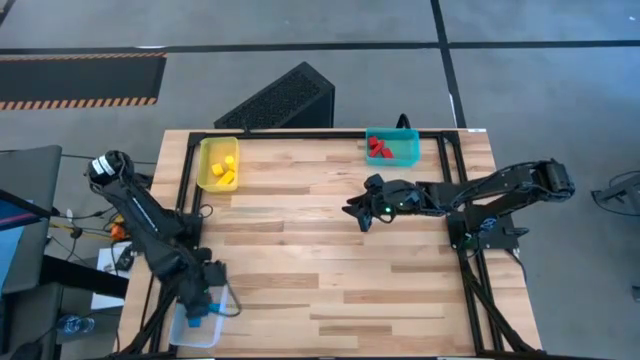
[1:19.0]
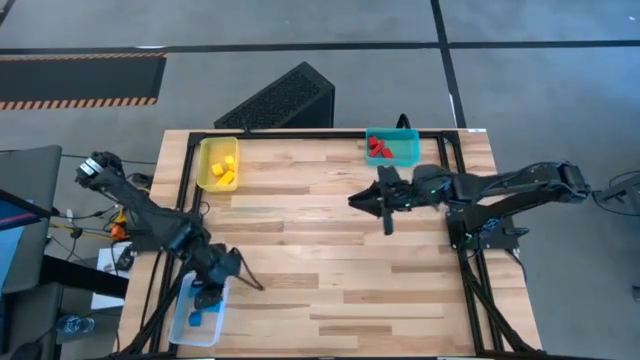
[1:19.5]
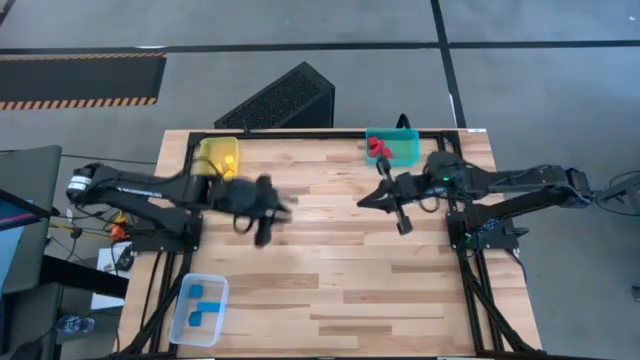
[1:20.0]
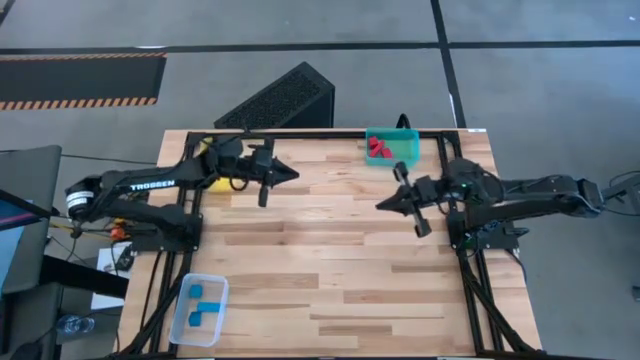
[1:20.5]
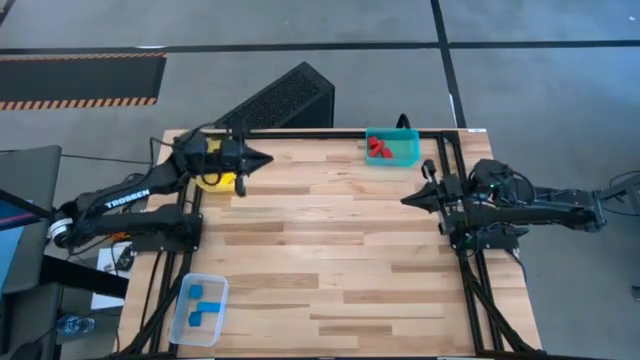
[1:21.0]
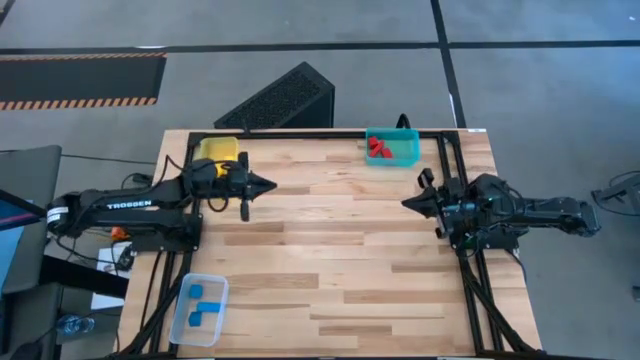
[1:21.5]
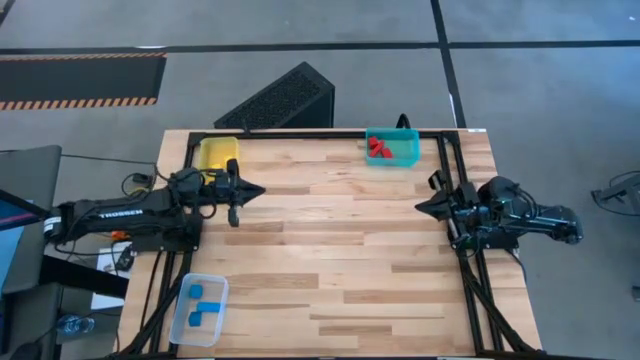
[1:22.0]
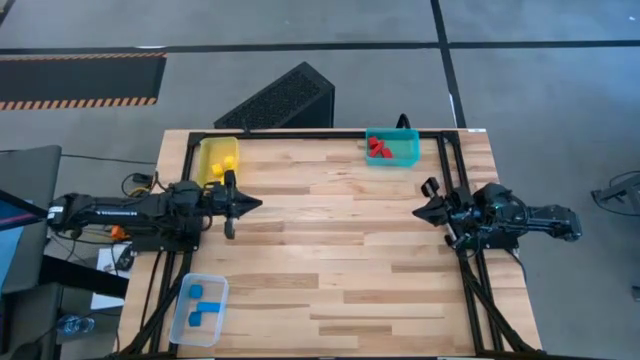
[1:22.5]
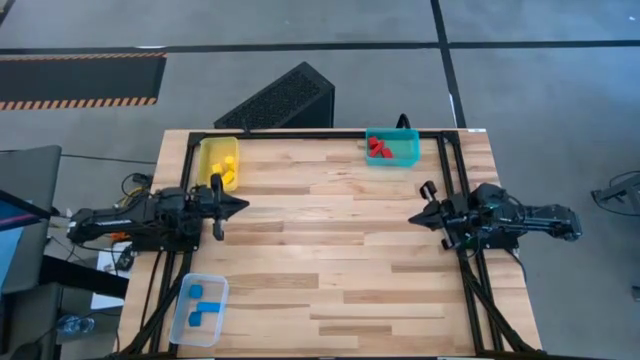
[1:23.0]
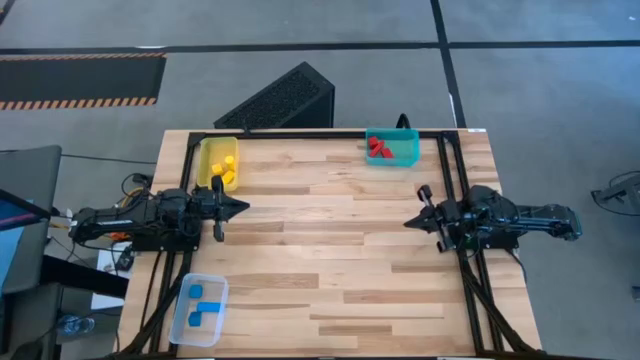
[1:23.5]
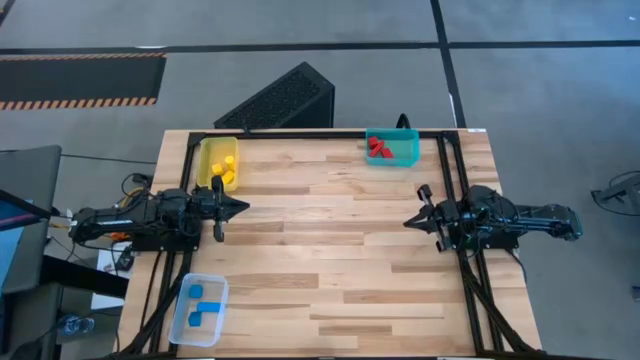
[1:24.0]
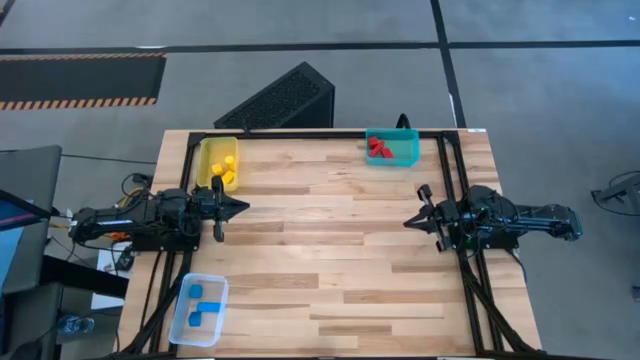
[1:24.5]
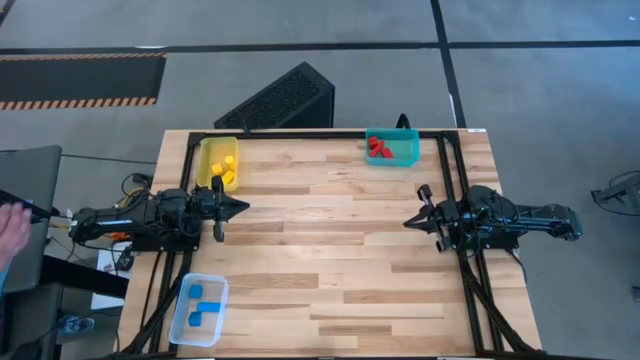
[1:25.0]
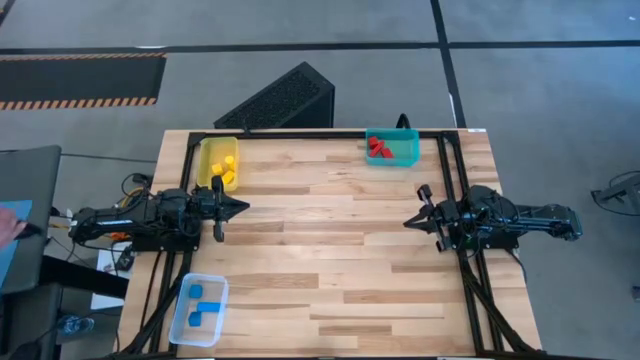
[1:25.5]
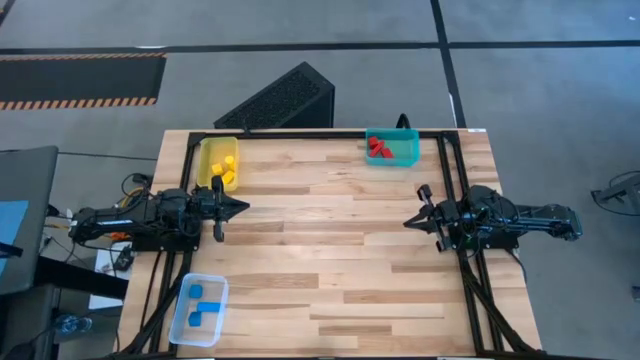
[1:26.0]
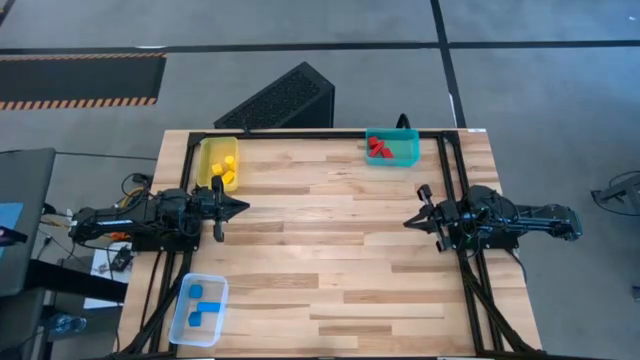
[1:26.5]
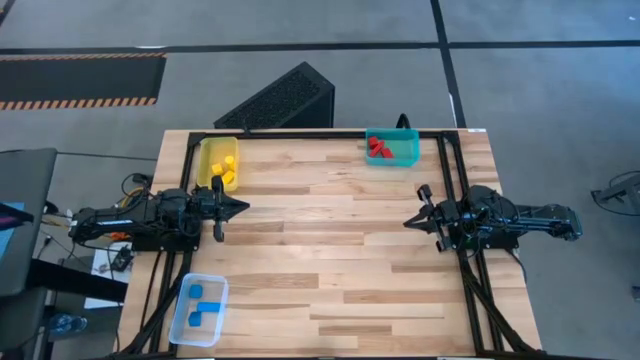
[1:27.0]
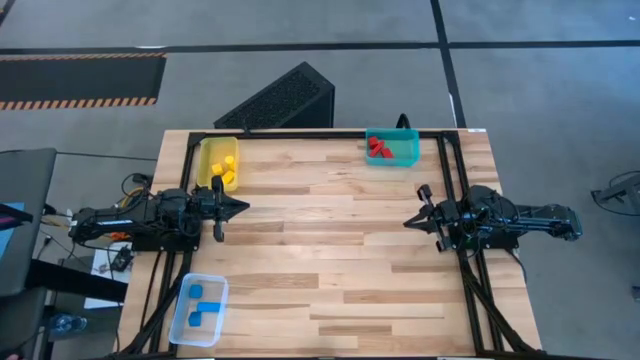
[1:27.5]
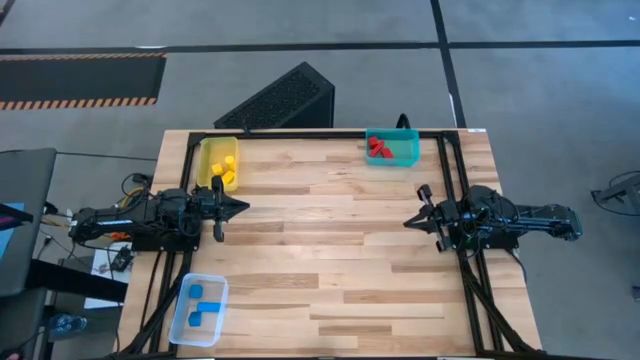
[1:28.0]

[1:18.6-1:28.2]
Task: Sort & place blocks by color
Return to Home Position

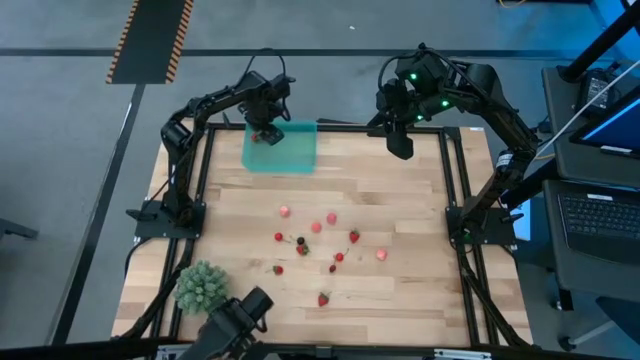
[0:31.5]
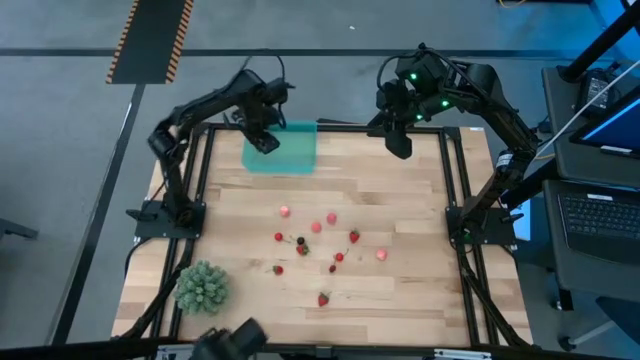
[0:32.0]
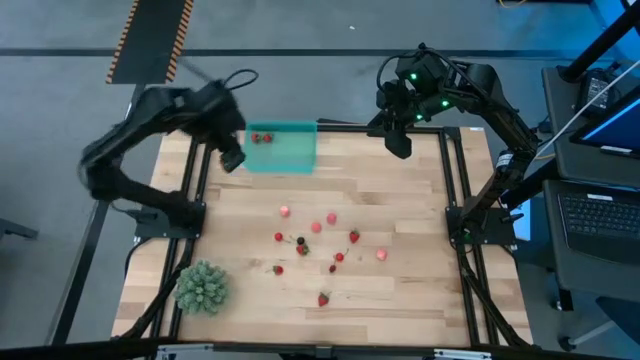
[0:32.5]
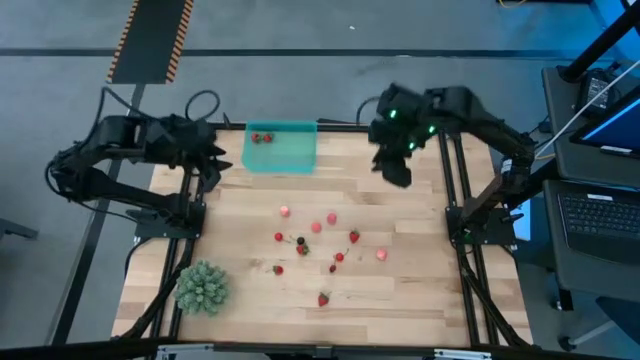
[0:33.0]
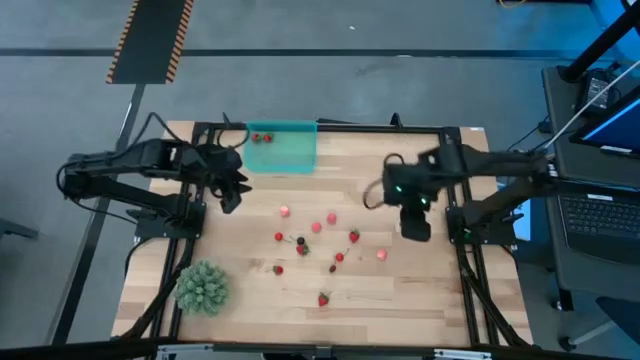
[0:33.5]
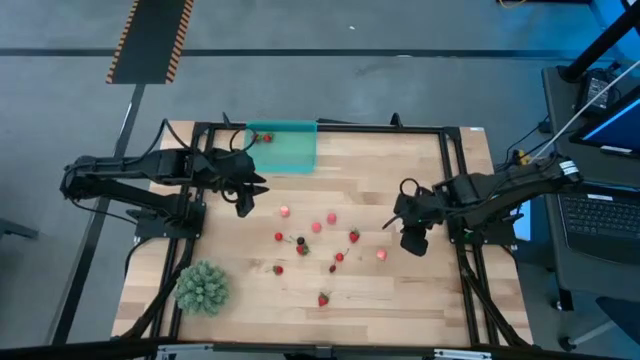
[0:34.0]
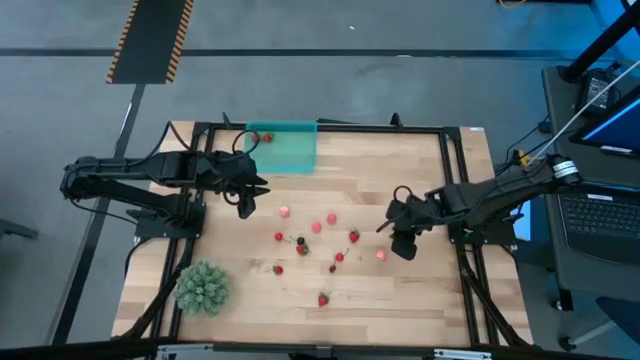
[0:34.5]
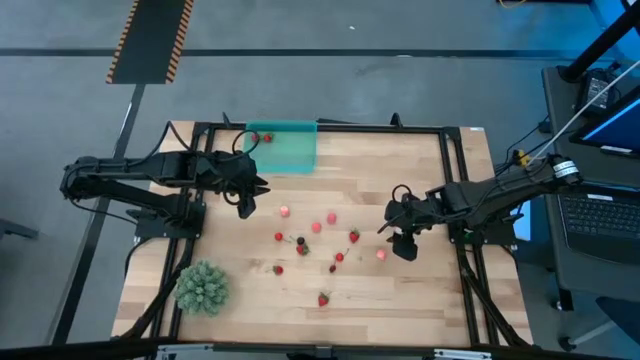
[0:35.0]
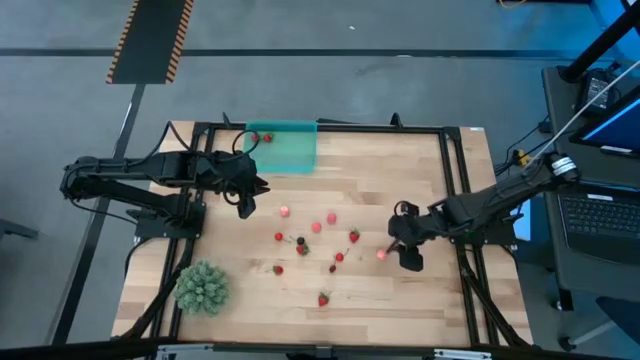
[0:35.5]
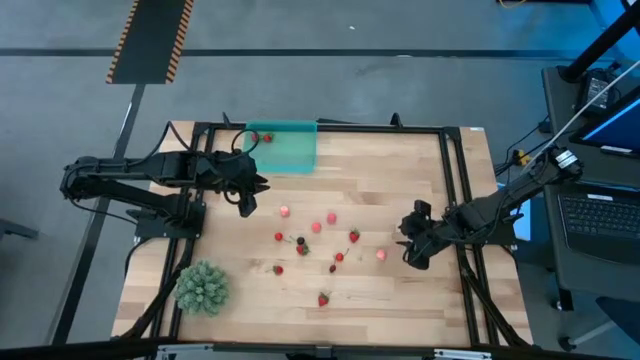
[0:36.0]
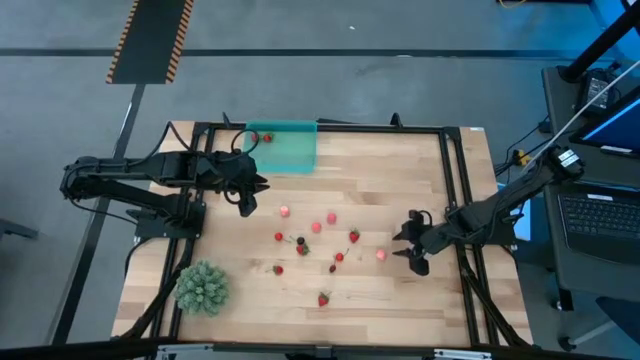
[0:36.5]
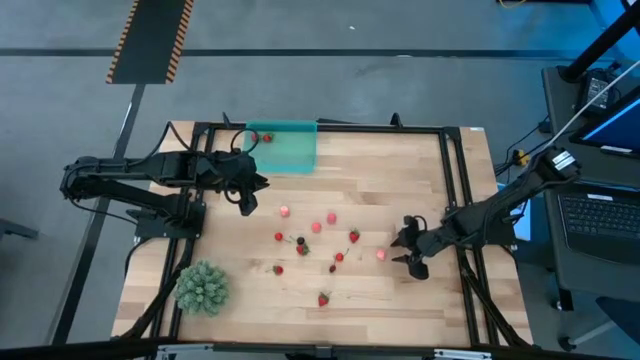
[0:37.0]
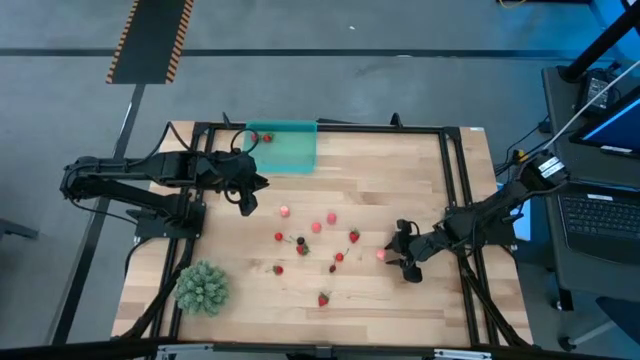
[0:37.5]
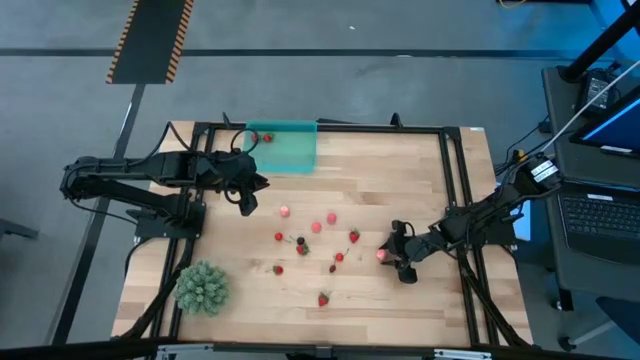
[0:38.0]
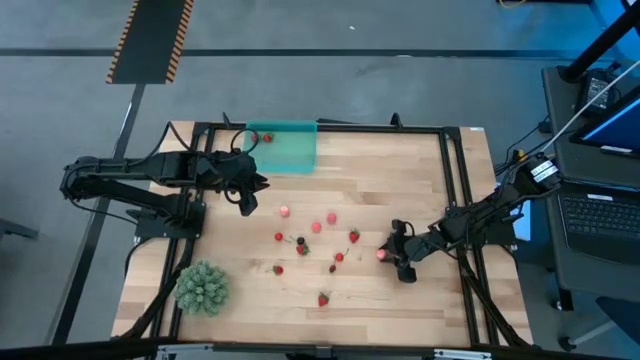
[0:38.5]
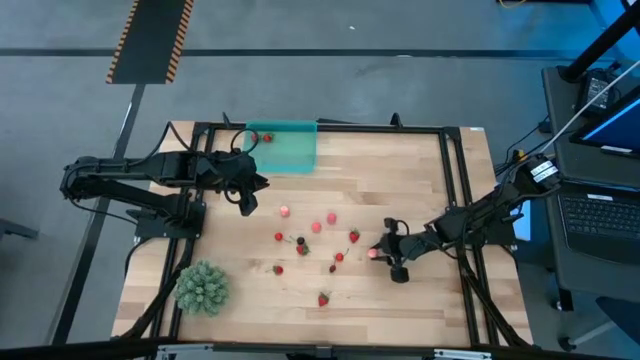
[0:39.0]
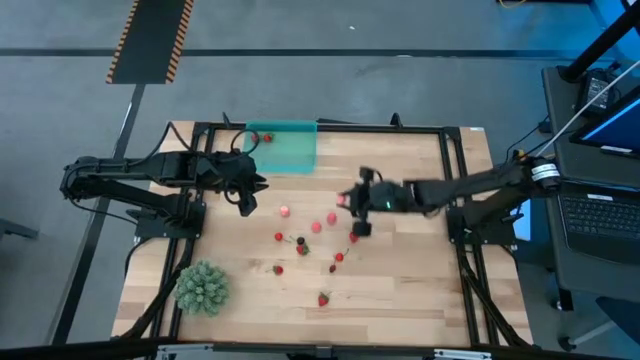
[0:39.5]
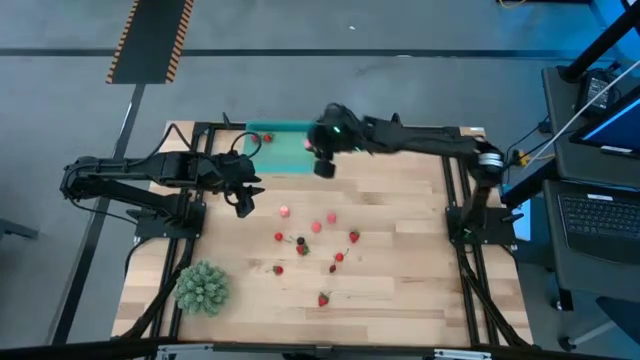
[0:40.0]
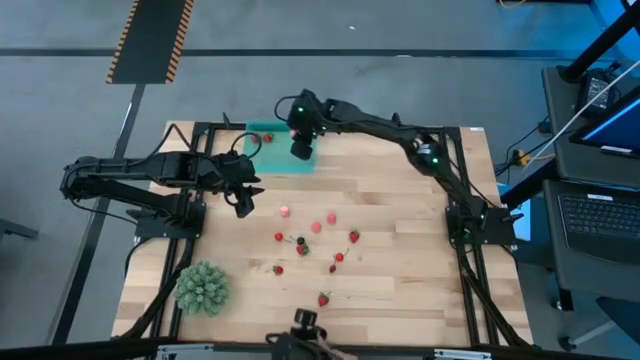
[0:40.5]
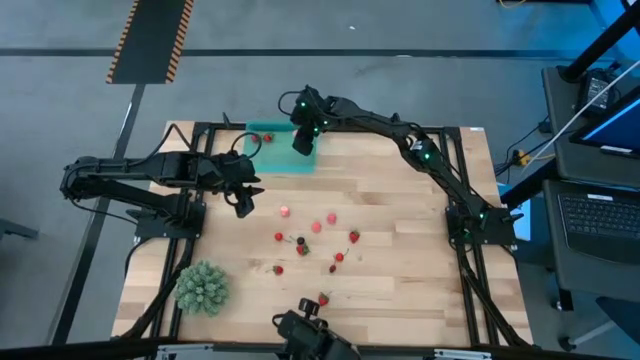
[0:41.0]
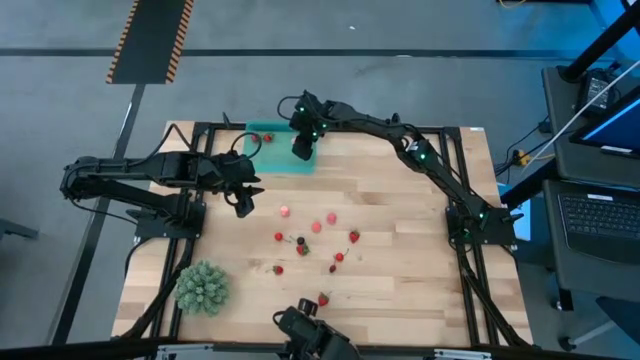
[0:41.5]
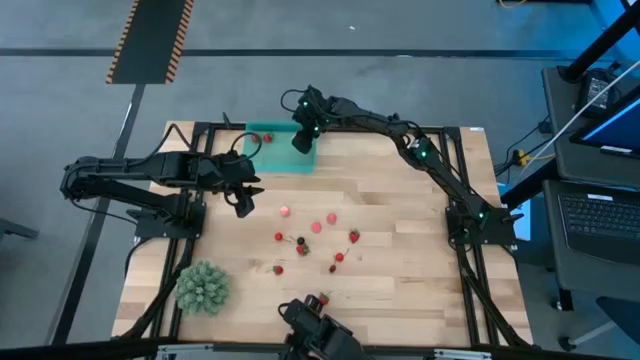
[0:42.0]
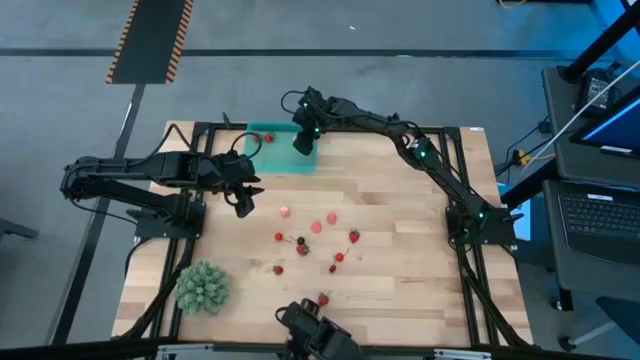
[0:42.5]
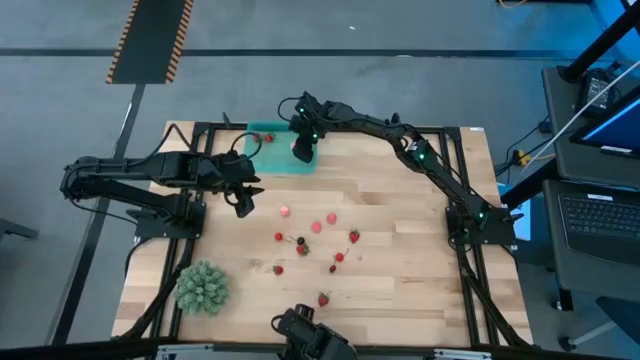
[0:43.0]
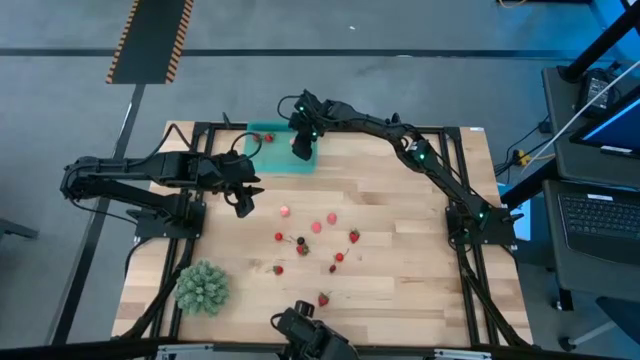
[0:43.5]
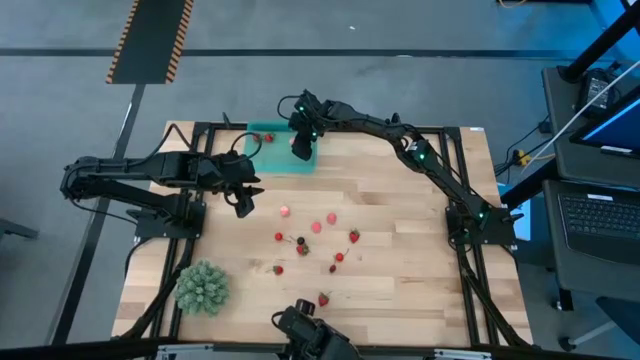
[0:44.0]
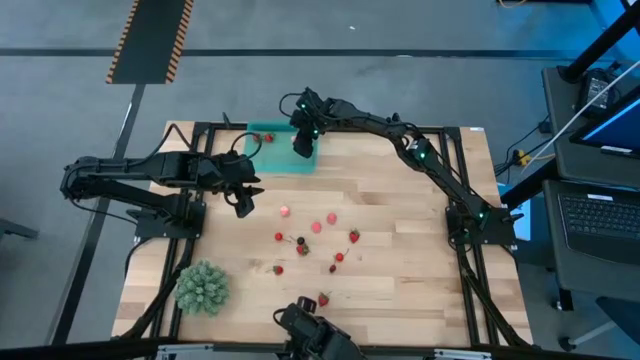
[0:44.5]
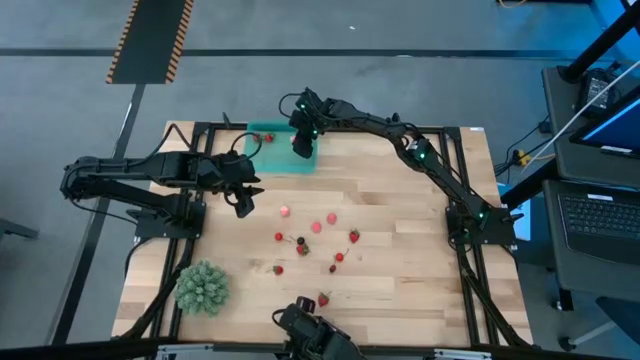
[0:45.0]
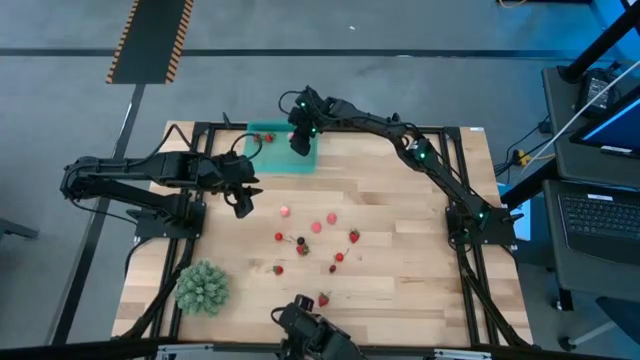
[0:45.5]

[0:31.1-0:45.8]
Task: Pick and placing Produce into tupperware
Put the pink peach into the blue bin
